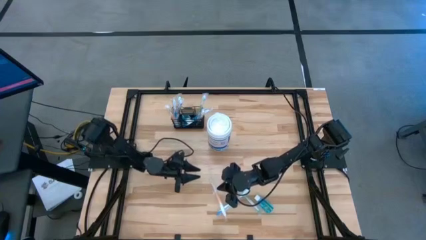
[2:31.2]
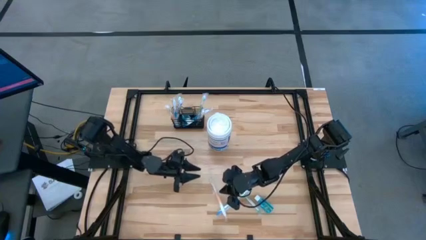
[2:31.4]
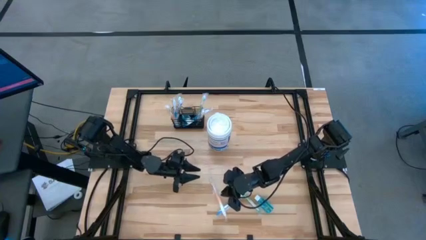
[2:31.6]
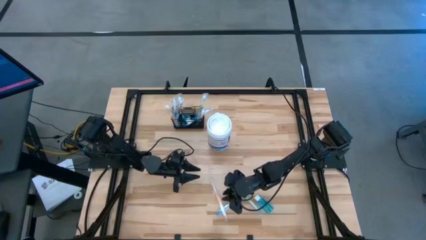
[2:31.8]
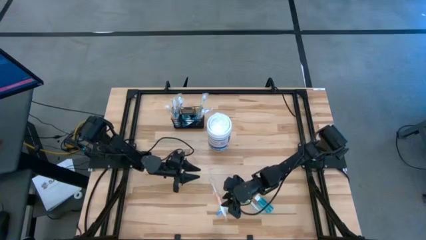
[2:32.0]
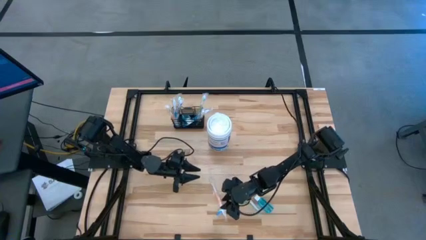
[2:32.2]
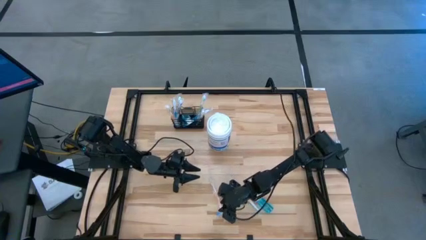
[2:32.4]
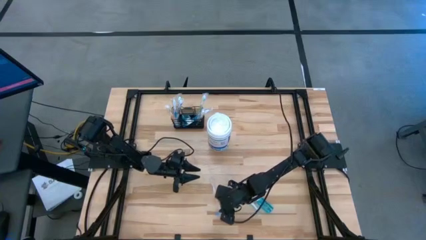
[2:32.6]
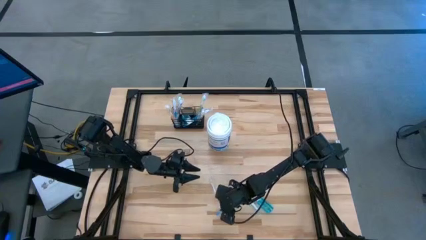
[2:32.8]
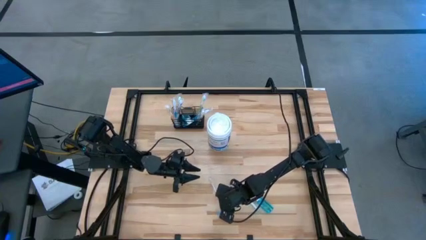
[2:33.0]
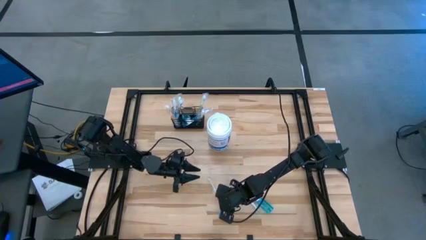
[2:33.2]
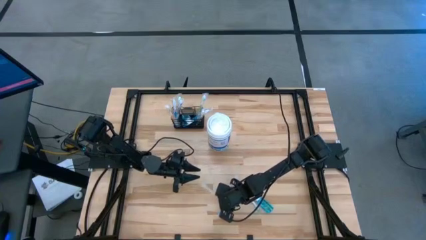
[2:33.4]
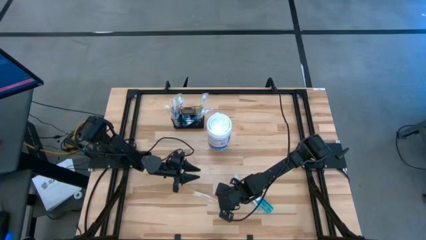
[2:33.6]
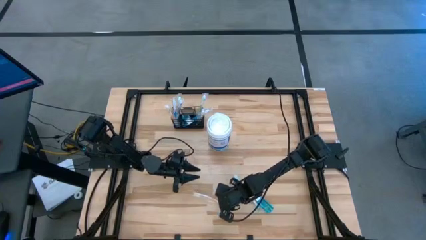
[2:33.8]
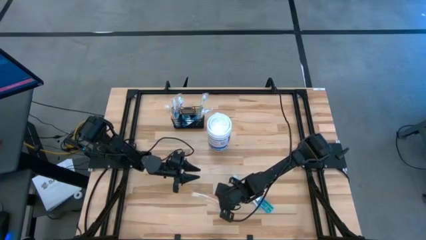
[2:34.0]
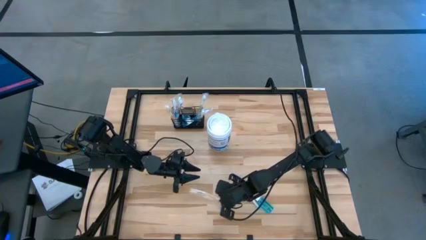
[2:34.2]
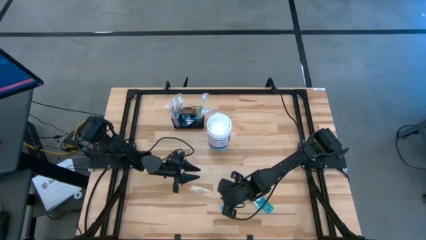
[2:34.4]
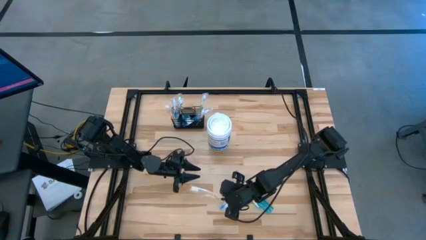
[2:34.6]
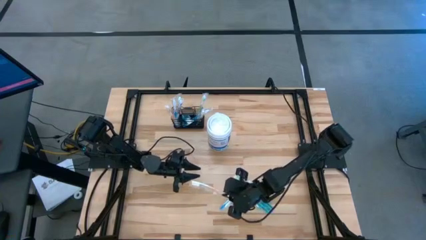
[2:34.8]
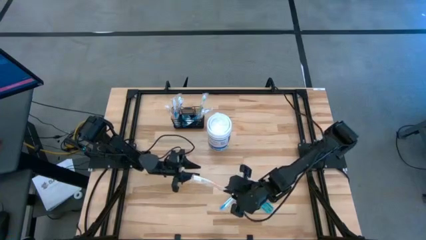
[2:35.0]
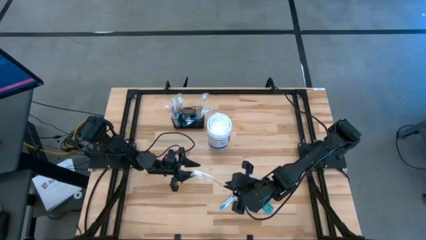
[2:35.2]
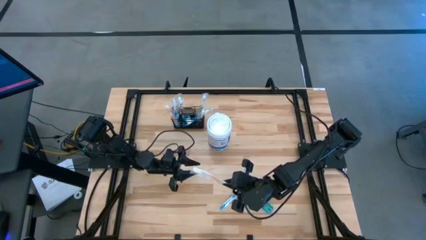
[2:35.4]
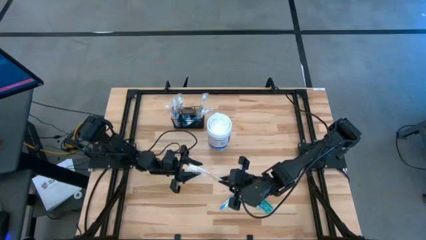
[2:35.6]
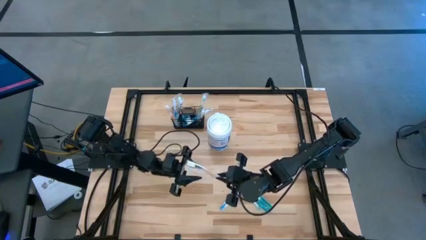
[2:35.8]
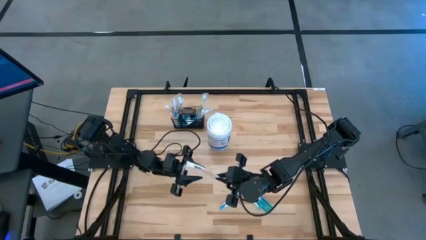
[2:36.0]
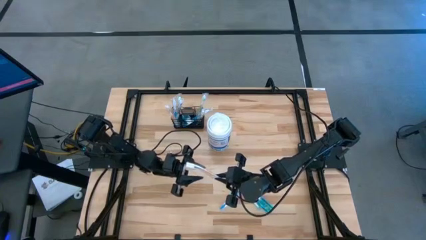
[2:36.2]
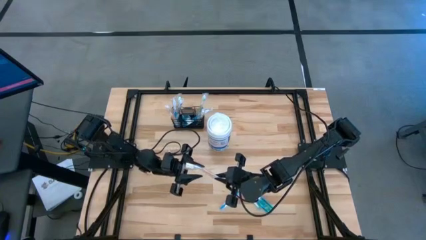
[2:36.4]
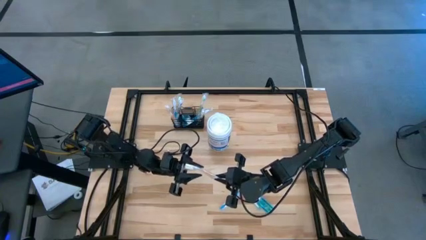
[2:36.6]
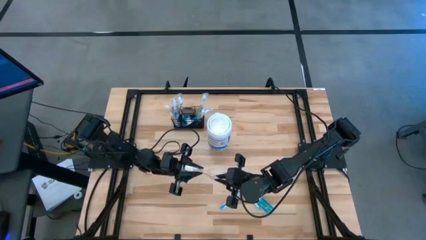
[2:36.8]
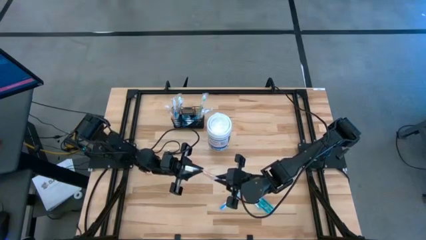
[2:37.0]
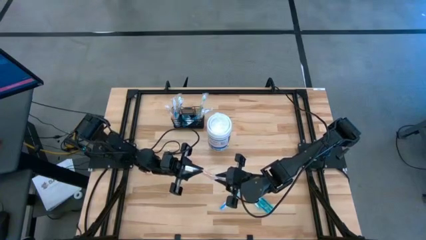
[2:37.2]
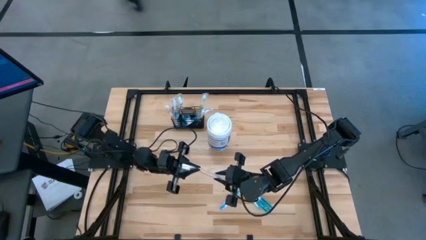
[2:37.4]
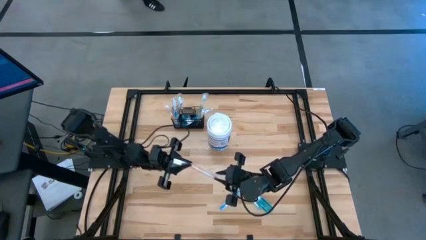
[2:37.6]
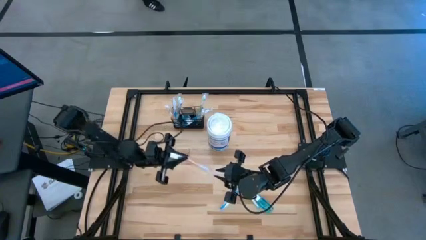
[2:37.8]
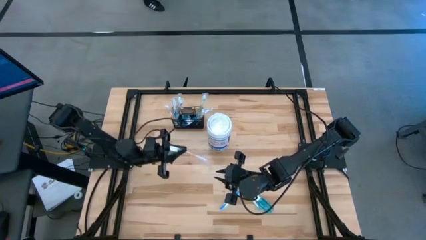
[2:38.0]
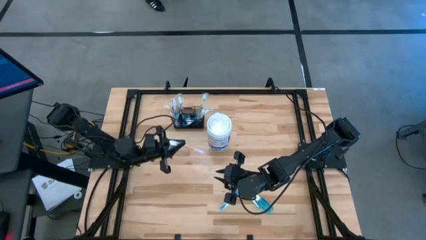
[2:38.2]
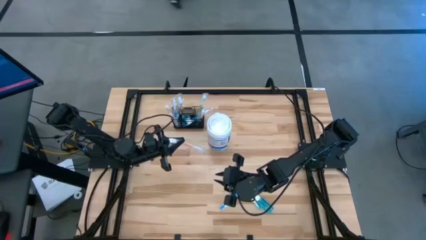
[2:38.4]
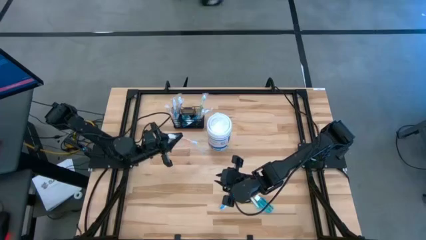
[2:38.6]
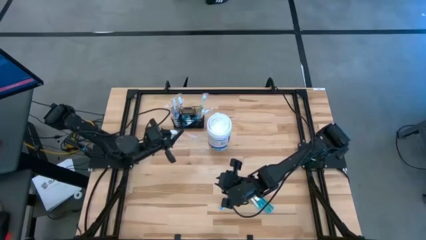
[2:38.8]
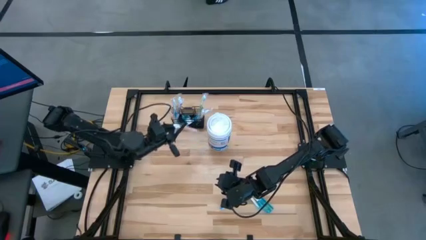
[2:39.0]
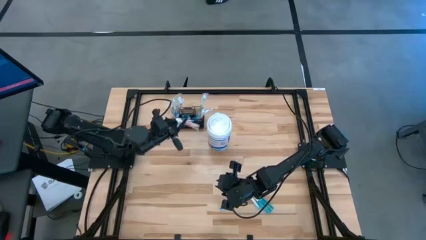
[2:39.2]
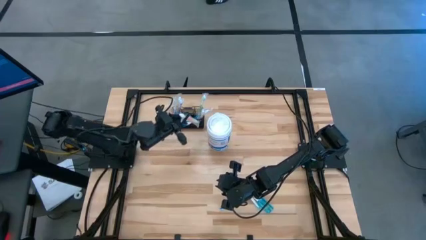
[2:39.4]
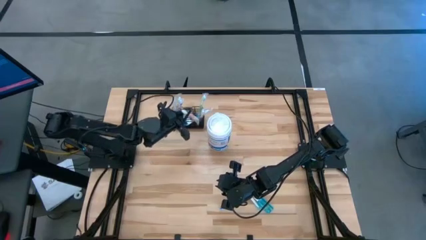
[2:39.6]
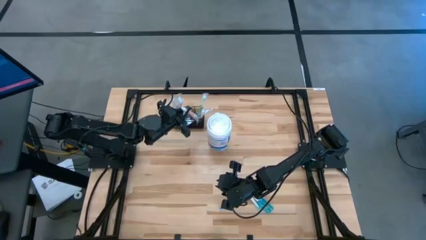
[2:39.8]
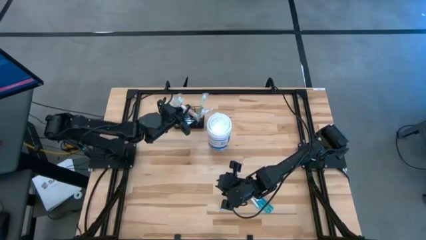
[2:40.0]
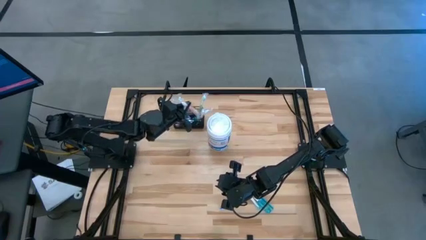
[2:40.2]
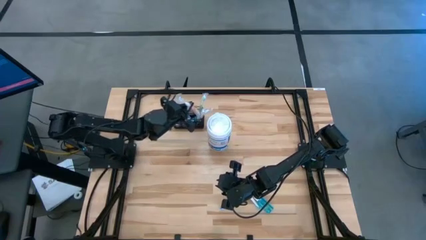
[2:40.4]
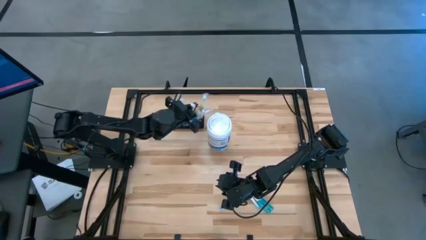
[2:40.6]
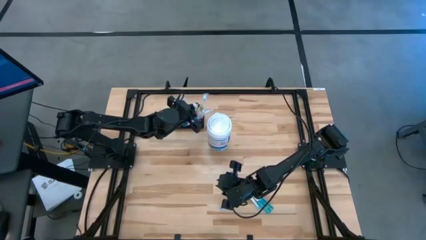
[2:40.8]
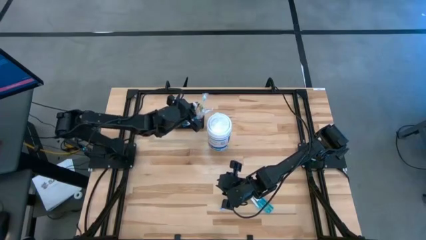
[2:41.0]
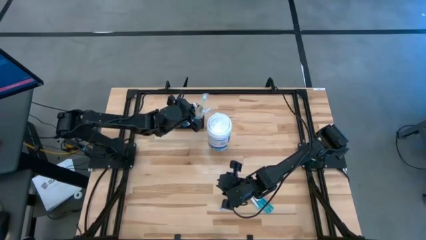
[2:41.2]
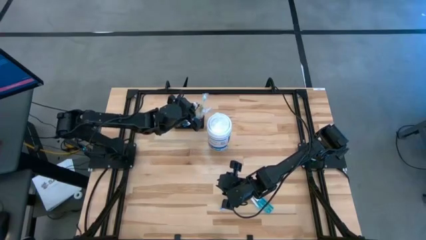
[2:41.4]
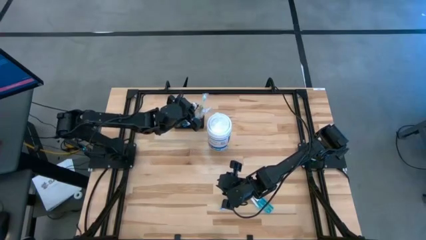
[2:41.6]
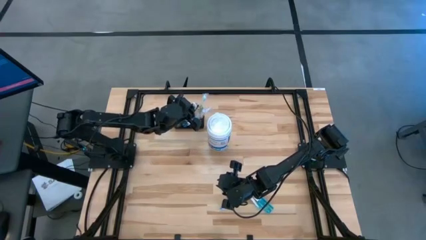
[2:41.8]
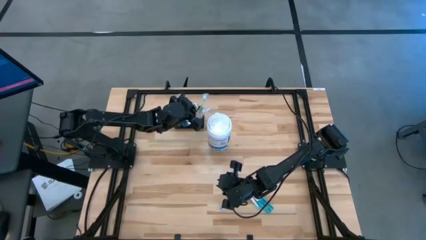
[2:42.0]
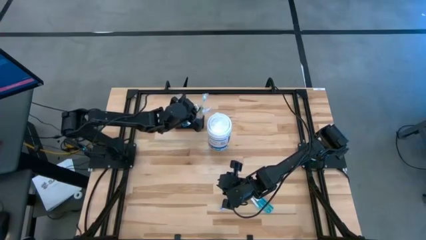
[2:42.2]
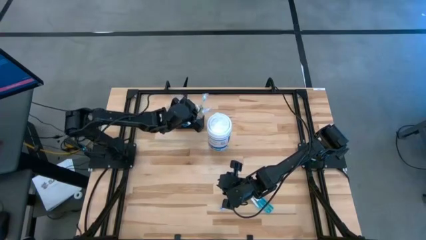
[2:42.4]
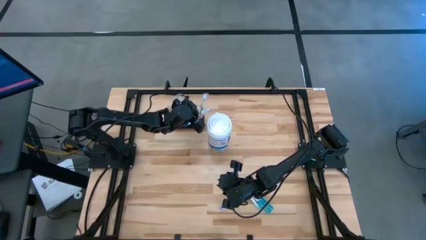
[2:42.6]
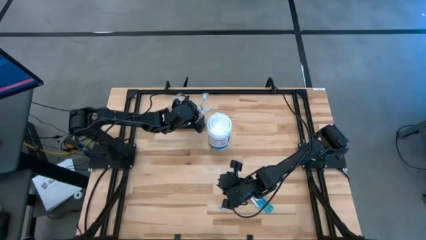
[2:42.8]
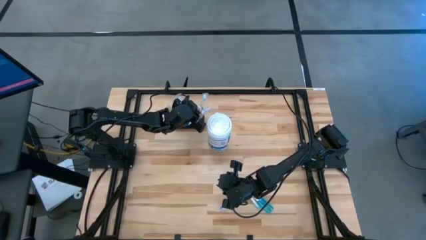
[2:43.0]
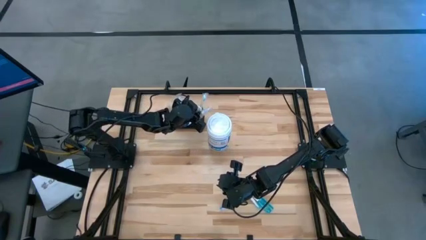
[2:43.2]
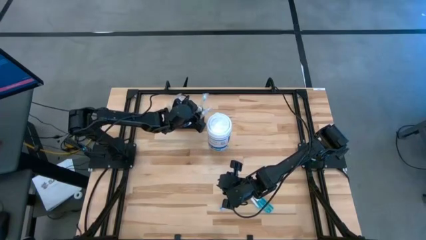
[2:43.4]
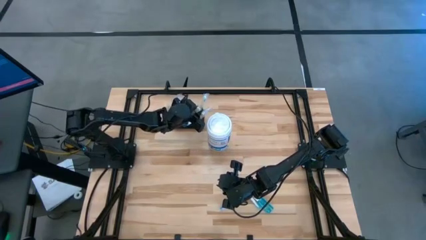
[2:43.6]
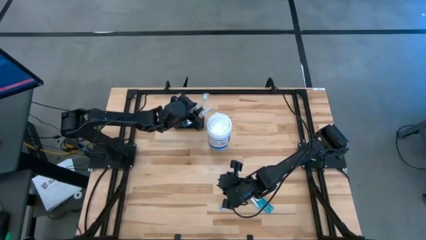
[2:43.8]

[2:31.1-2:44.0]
Task: Pick & Place toothbrushing station
Put the orange toothbrush into the mesh organizer

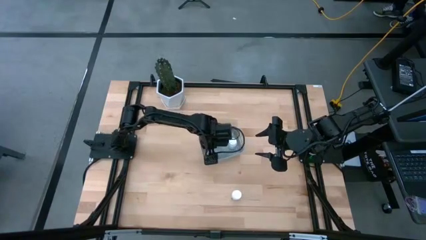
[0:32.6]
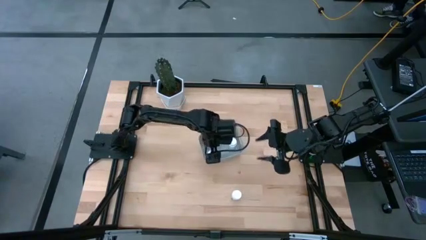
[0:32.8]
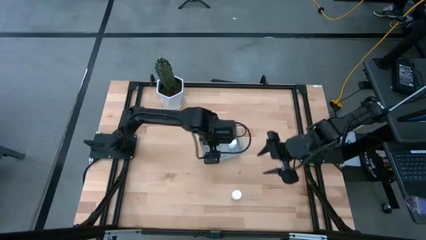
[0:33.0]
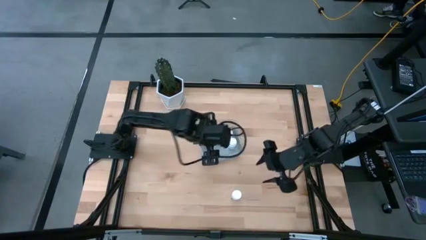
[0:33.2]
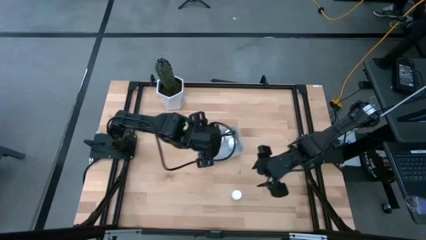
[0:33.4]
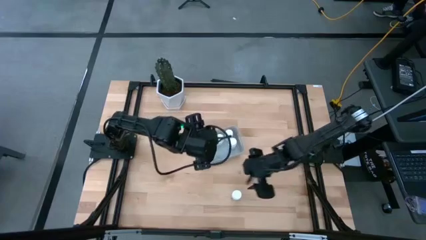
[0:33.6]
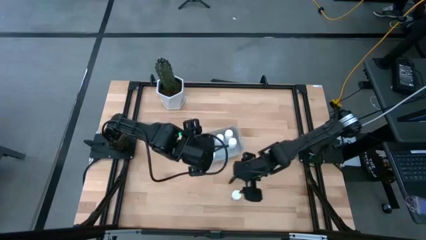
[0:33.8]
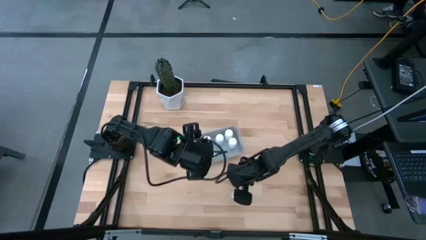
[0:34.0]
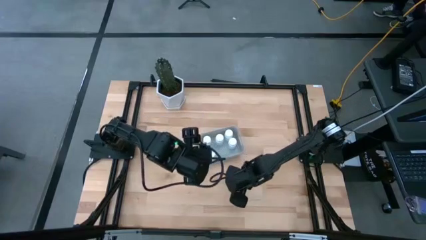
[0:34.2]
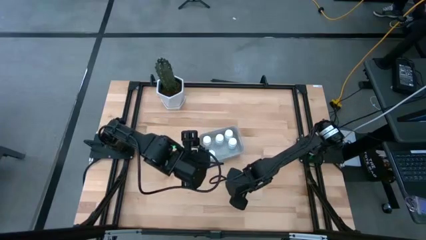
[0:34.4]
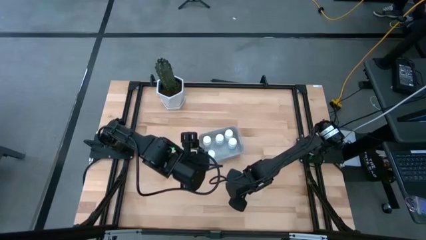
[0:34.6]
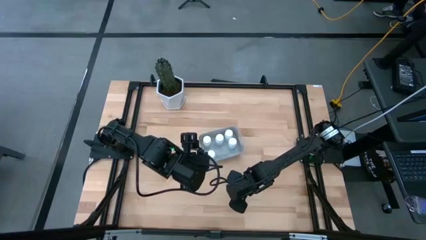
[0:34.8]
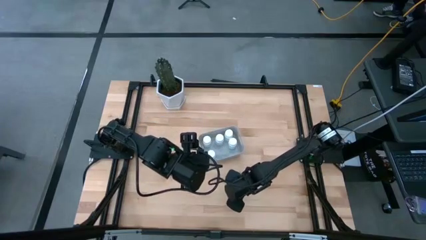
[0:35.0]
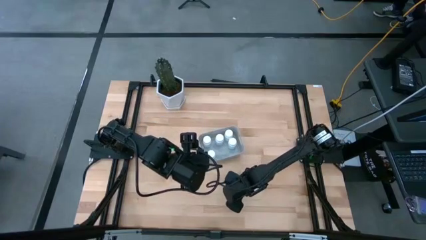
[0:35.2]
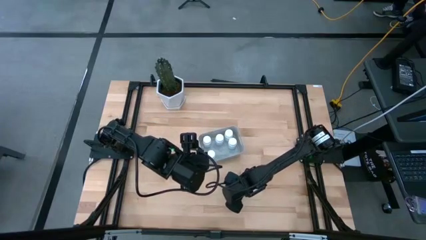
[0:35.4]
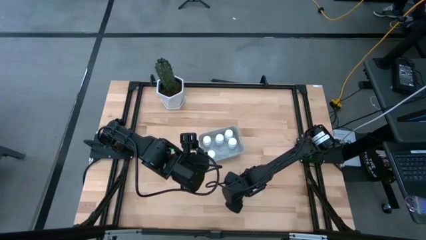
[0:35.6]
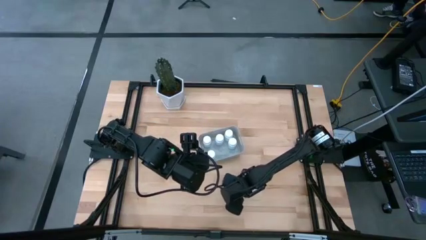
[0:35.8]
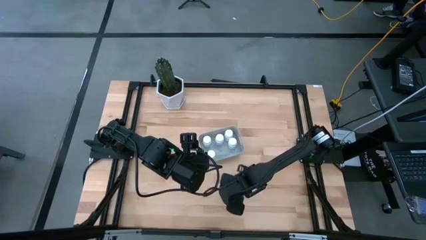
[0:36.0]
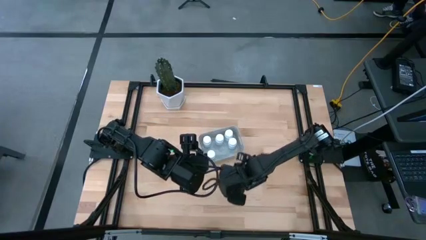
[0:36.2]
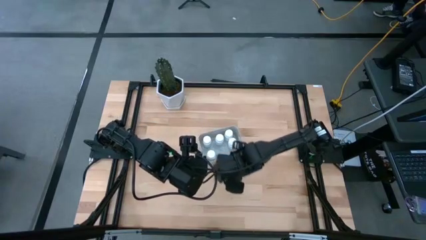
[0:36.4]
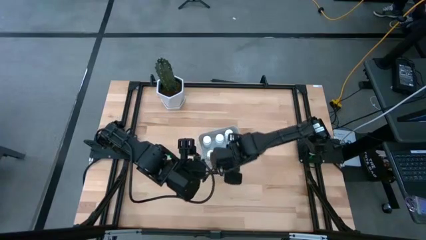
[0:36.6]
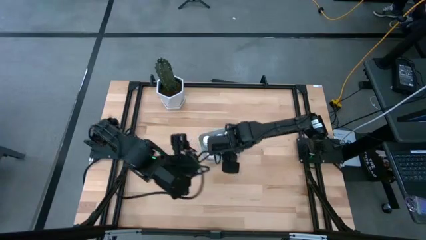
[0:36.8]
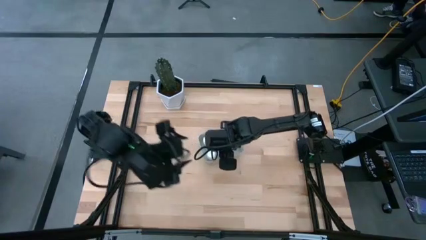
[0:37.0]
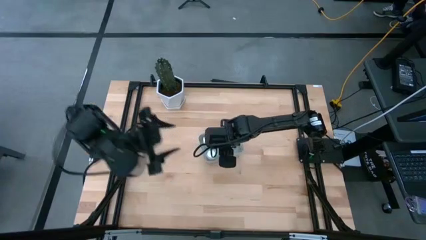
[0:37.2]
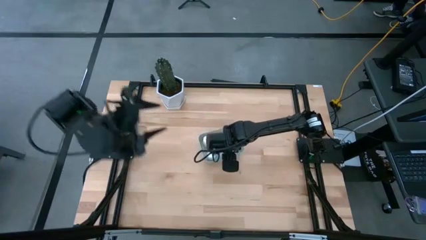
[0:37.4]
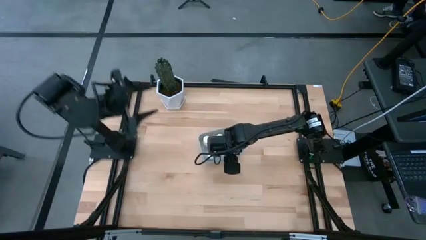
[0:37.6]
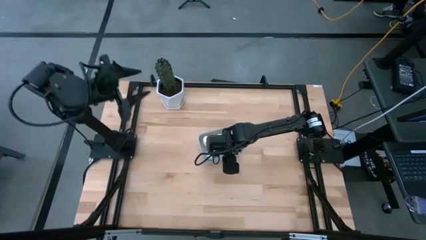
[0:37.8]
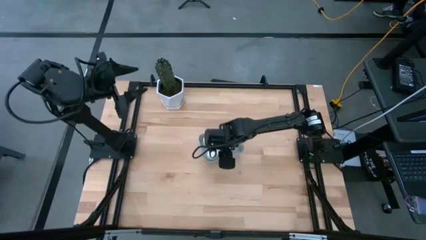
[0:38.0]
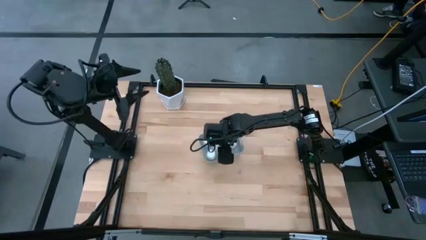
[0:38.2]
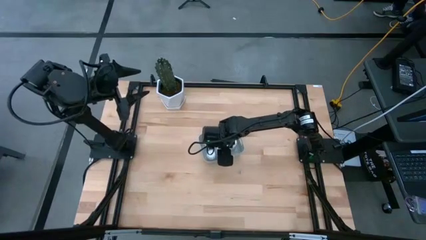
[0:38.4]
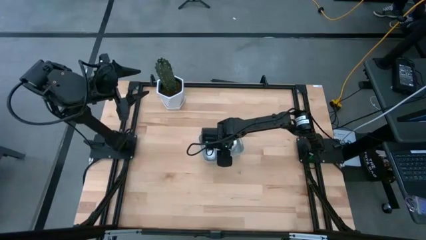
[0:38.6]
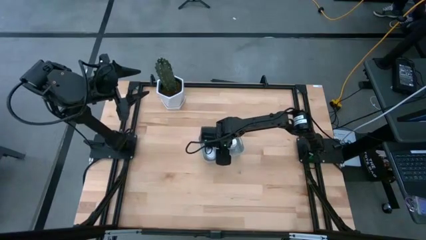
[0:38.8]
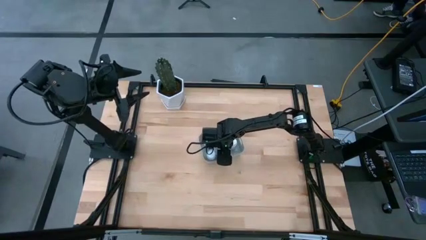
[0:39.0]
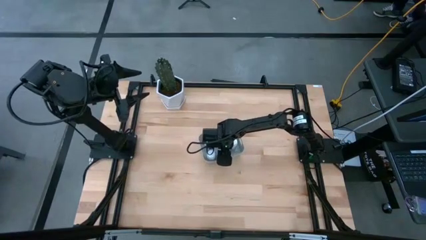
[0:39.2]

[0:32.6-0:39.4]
Task: Pick and place pill bottles into a basket
Put the white pill bottle into the gray bin
